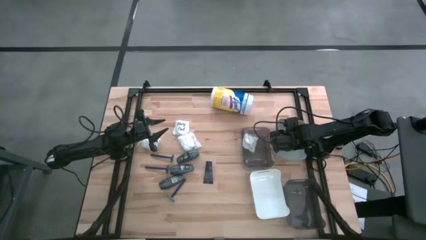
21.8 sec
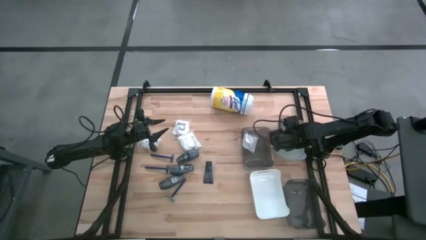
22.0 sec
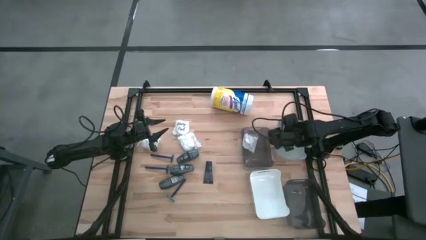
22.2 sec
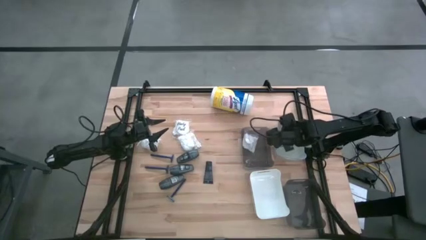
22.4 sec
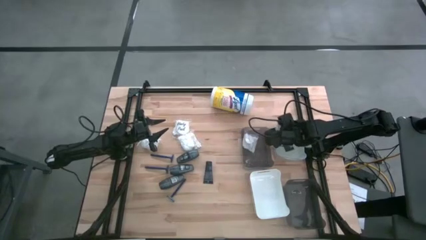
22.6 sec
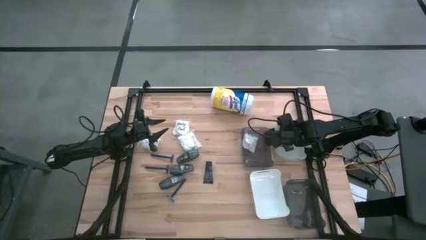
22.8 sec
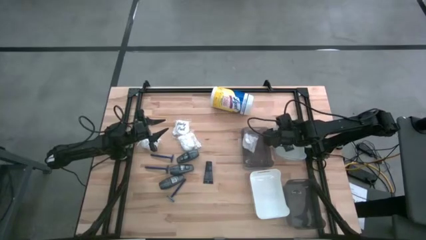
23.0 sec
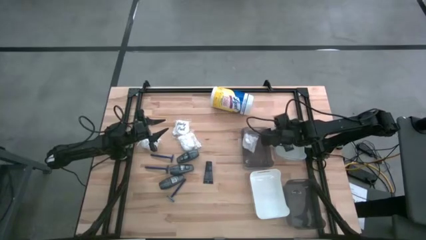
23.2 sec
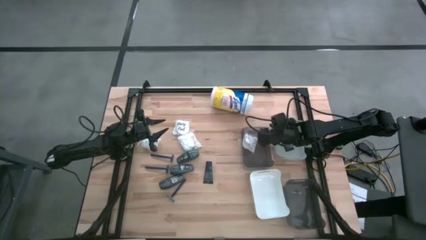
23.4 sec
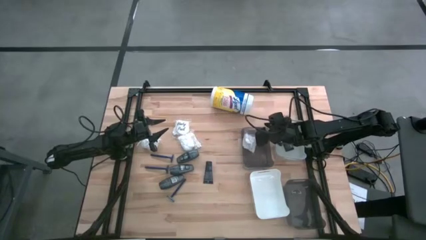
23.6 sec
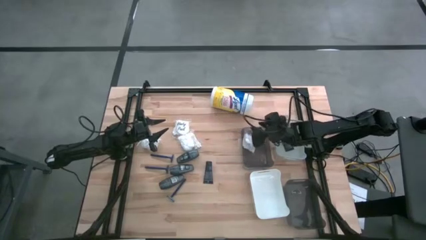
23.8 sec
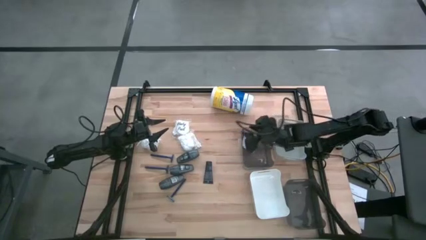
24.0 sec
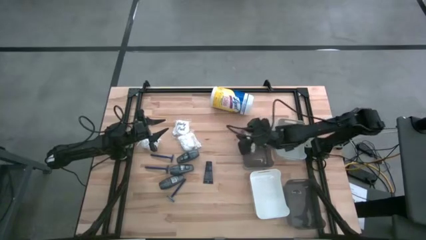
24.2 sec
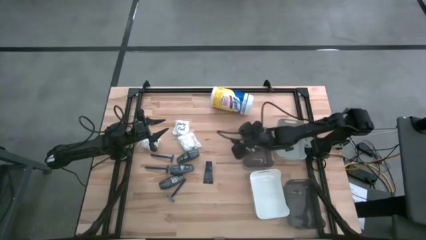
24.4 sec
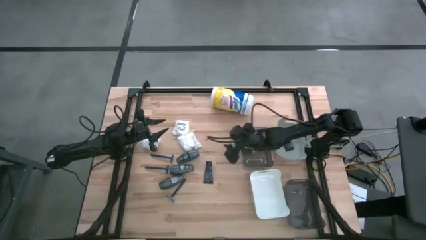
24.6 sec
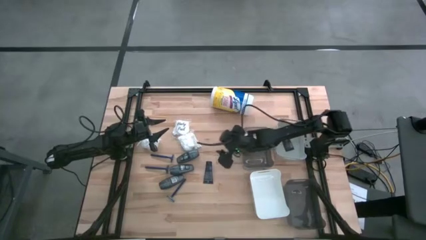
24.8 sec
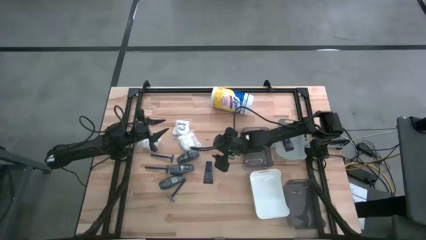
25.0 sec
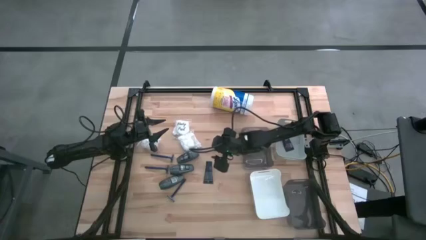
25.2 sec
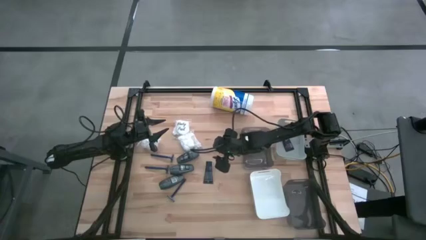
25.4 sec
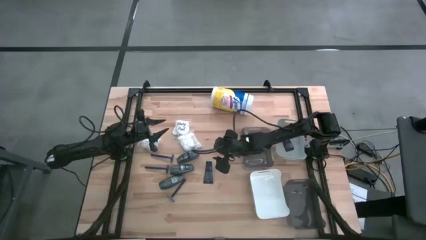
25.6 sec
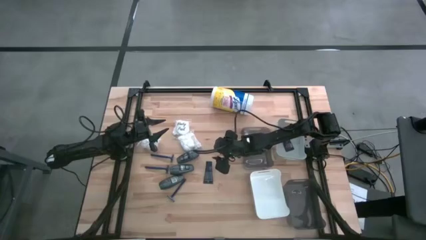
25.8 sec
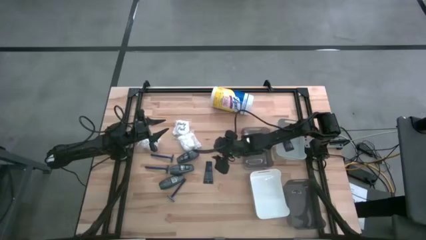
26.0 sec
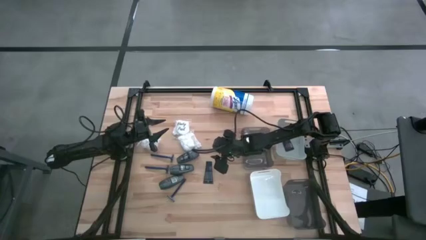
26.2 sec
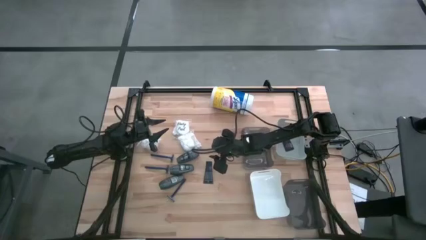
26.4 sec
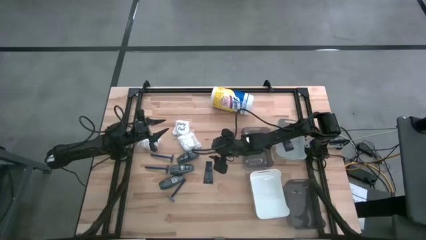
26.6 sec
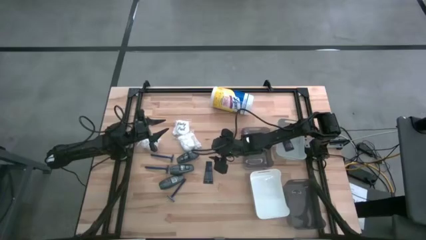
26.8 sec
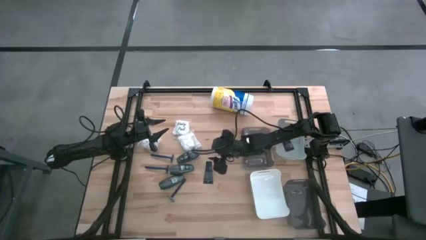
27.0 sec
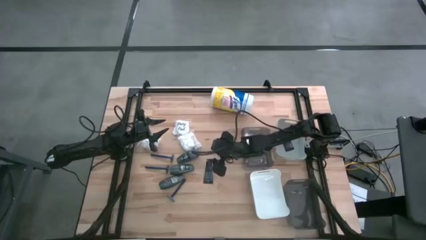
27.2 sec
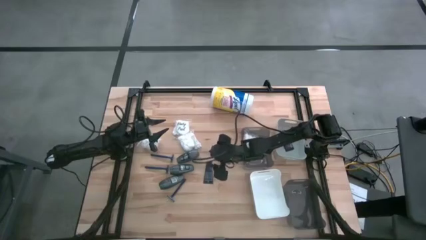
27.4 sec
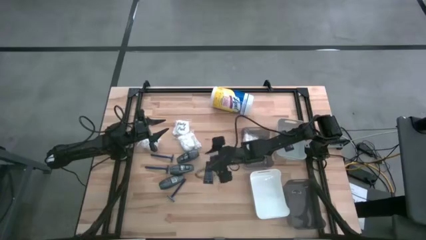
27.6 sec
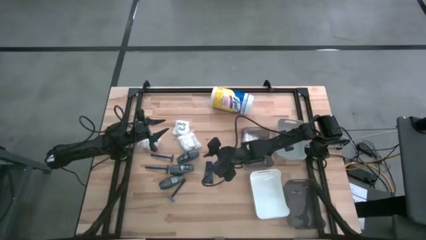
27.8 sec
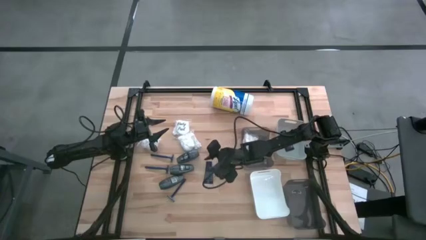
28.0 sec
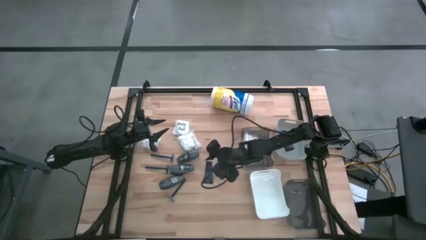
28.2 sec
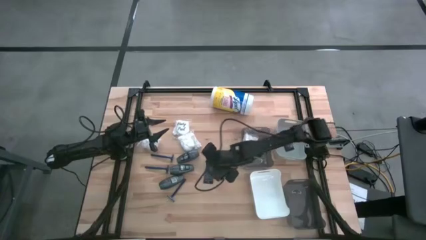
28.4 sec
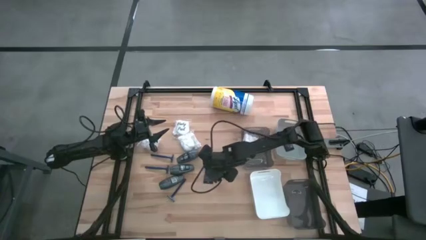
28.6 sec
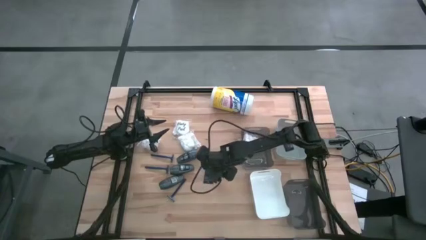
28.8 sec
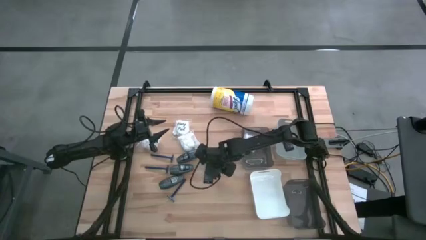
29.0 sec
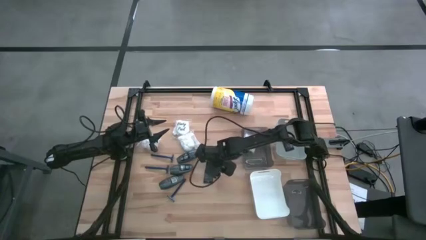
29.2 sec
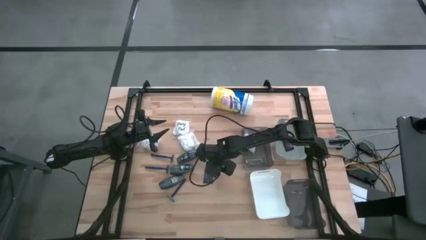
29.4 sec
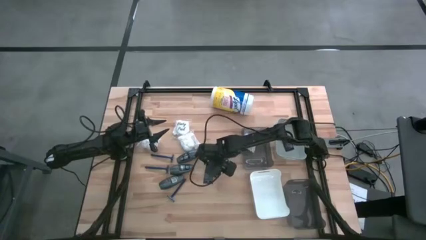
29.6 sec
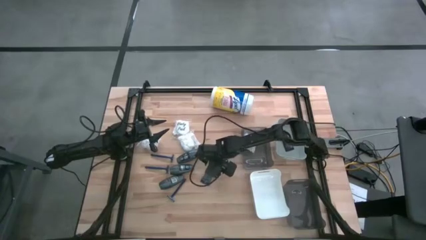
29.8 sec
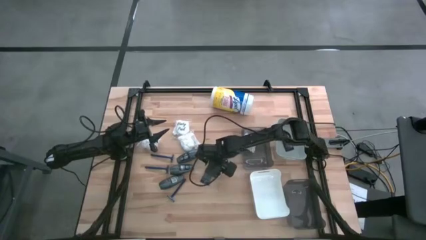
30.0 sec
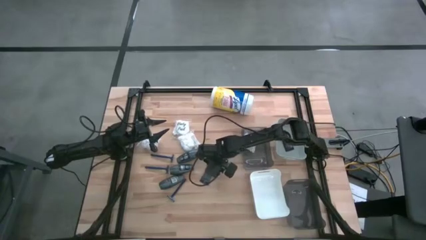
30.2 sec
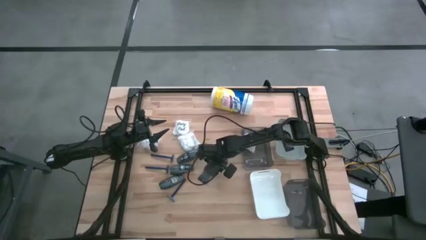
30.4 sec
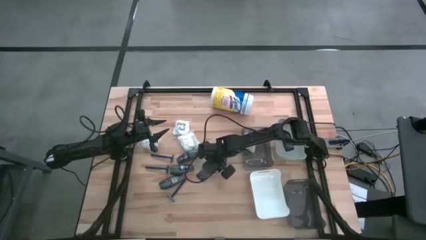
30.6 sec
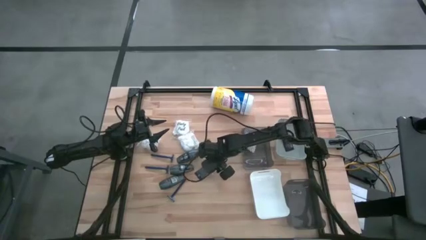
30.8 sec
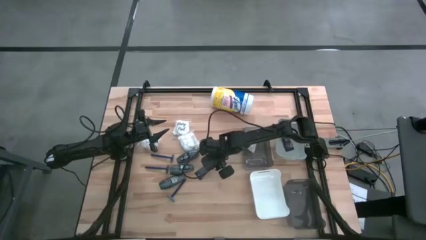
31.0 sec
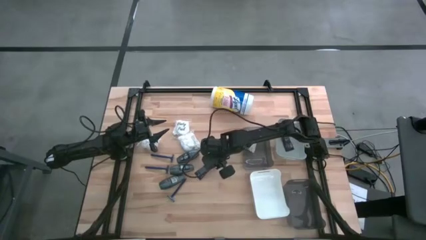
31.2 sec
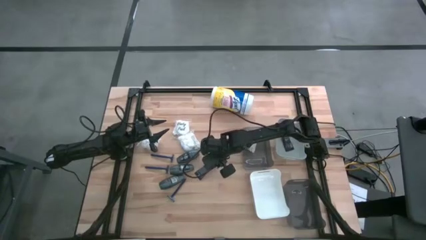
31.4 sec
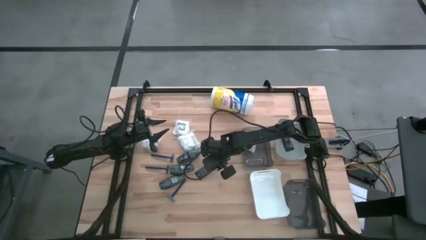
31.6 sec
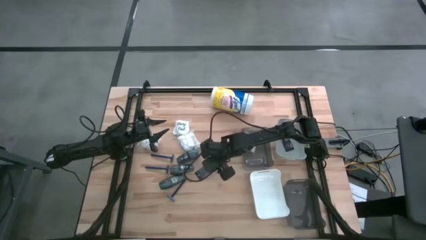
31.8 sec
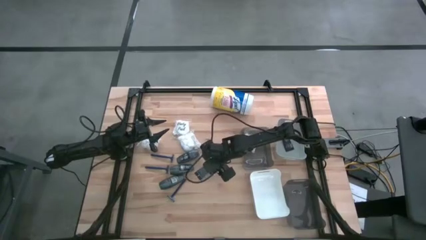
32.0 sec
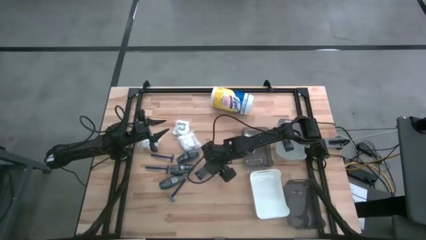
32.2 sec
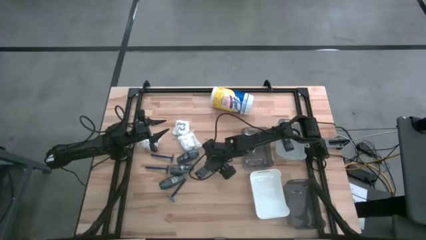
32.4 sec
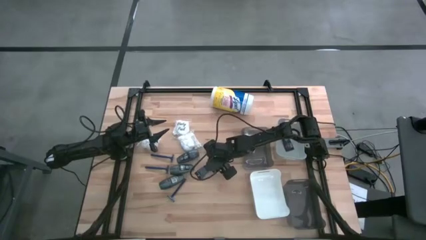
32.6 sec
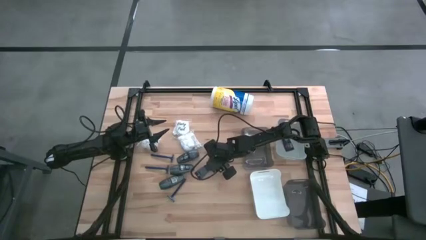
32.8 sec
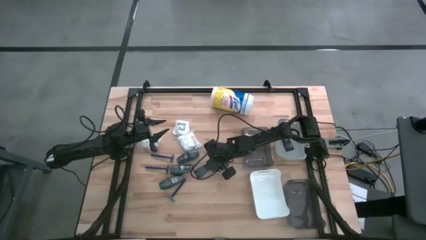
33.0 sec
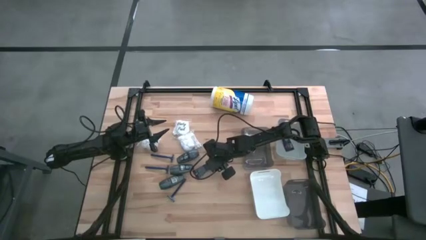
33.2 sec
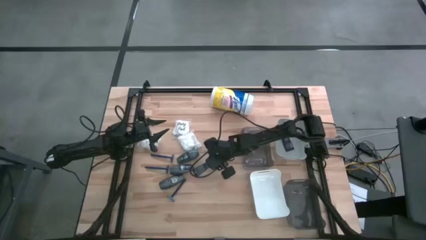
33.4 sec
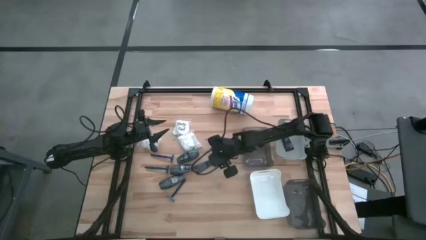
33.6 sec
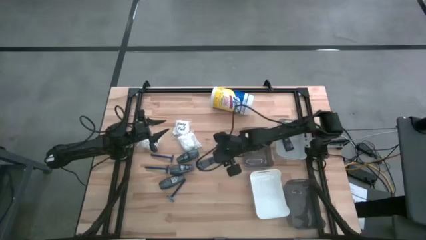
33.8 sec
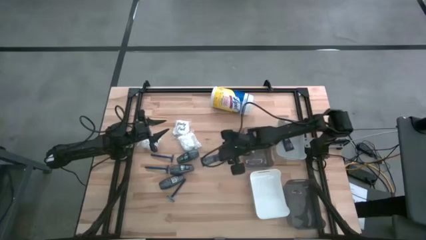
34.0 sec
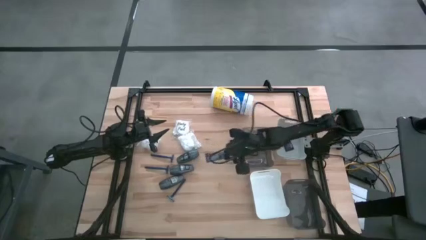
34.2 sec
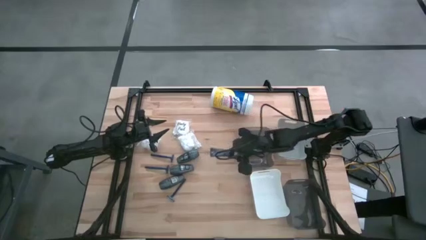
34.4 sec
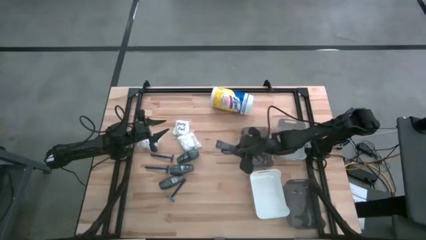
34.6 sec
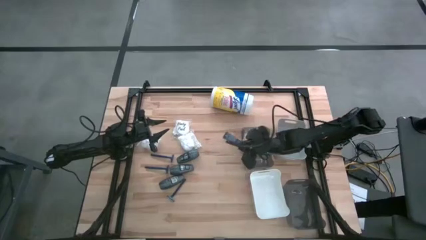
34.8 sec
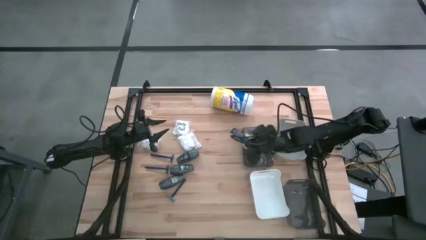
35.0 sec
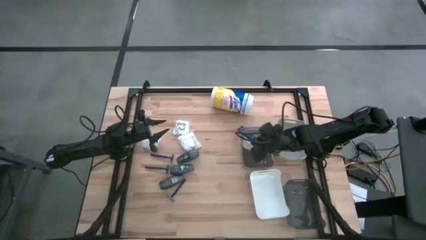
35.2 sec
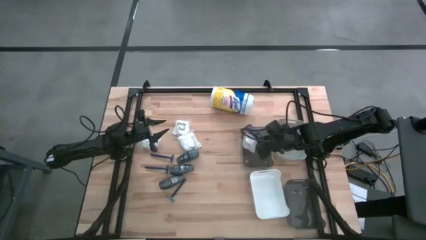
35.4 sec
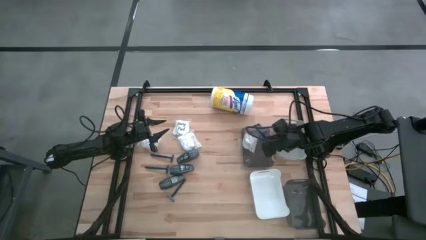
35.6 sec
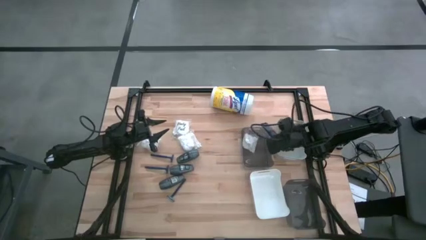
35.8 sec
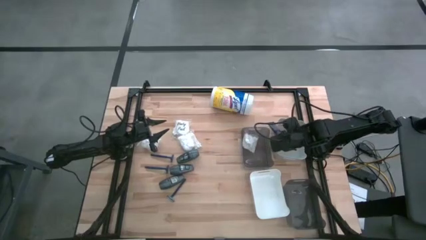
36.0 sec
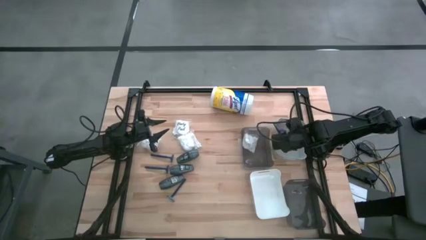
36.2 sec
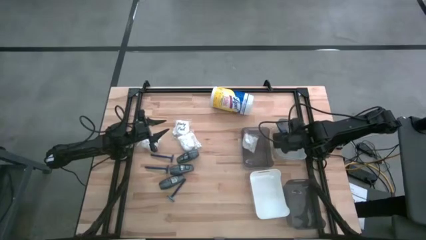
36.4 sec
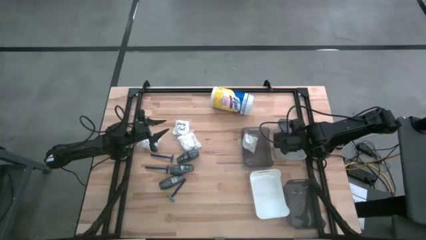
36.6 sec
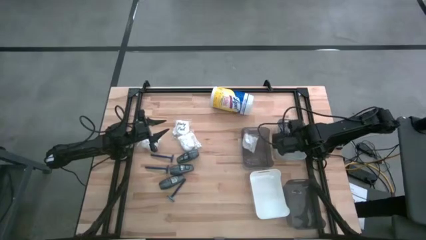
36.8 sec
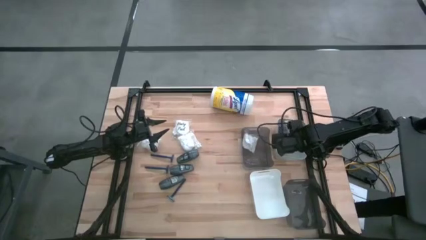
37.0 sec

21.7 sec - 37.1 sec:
Task: Pick & Place Travel size toiletries
Put the shave cream into the gray bin
